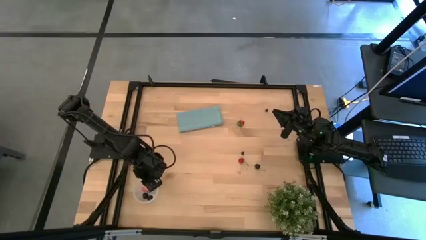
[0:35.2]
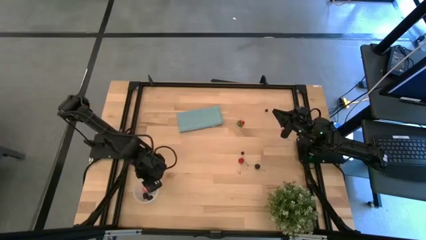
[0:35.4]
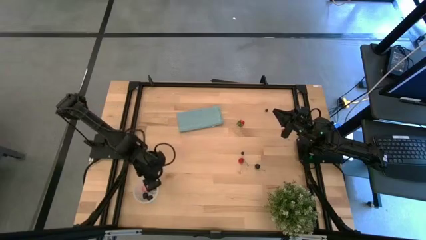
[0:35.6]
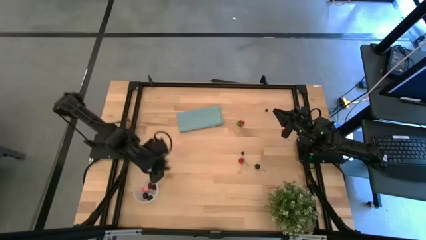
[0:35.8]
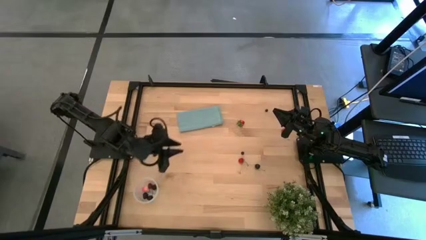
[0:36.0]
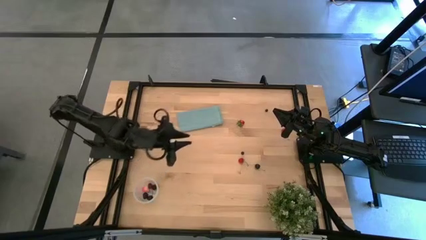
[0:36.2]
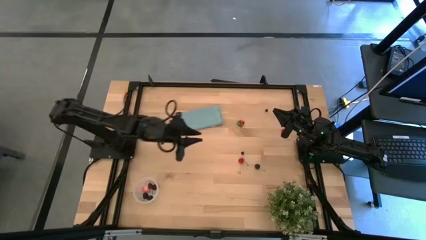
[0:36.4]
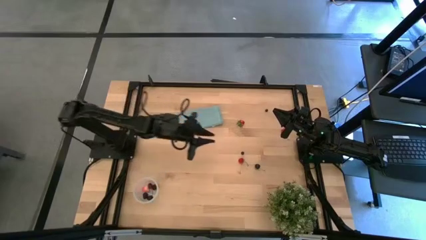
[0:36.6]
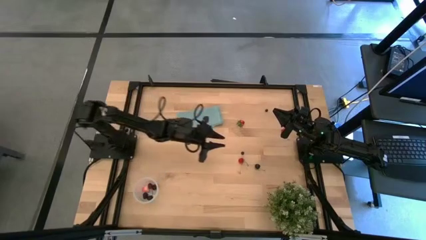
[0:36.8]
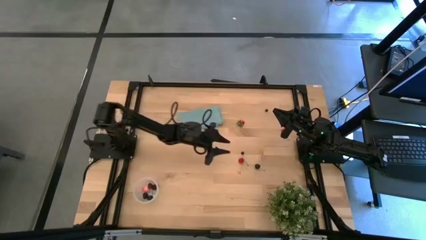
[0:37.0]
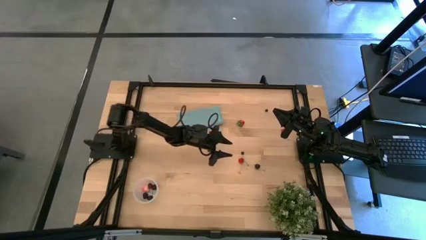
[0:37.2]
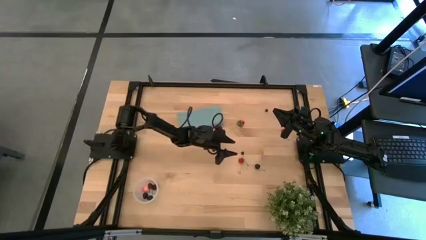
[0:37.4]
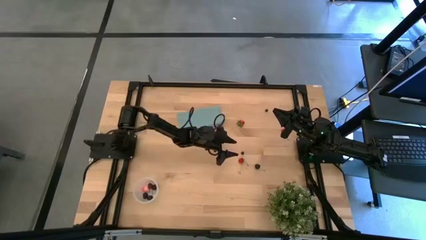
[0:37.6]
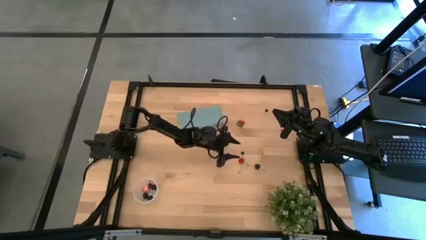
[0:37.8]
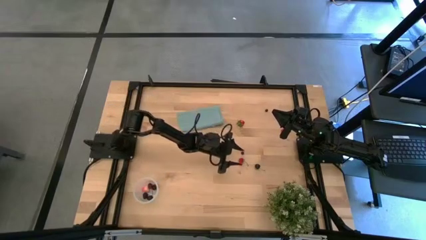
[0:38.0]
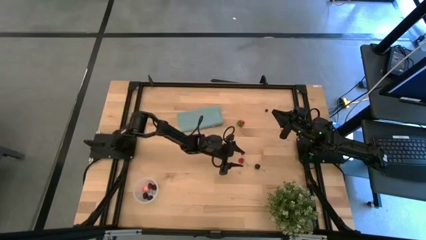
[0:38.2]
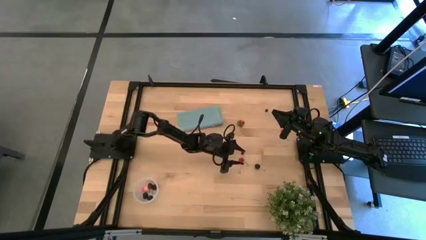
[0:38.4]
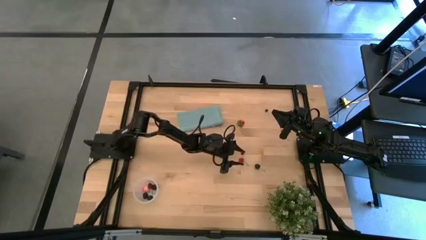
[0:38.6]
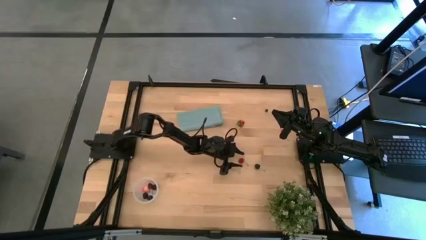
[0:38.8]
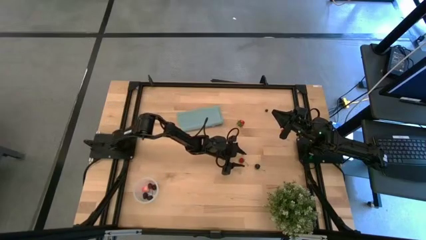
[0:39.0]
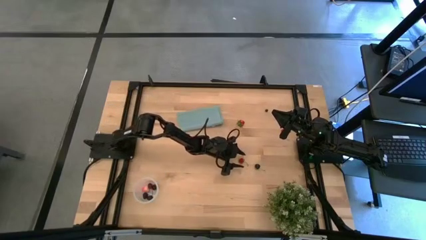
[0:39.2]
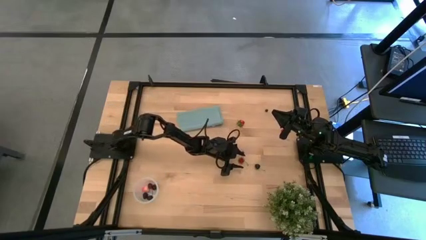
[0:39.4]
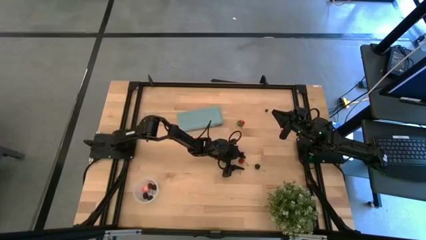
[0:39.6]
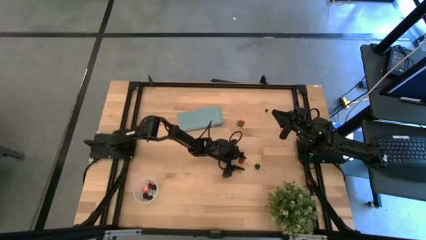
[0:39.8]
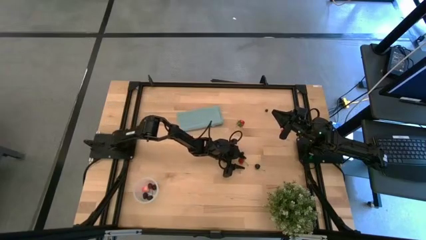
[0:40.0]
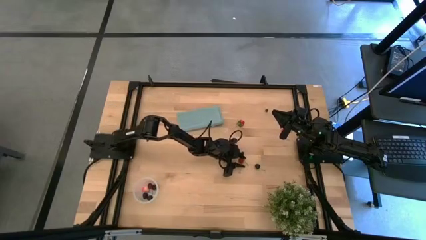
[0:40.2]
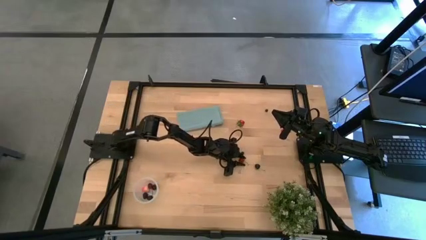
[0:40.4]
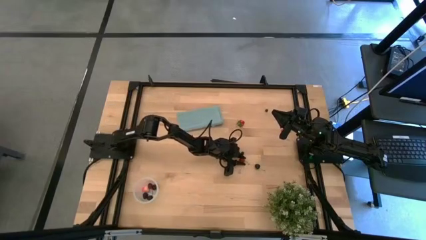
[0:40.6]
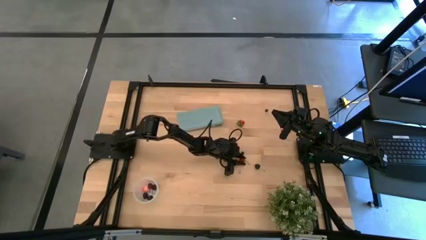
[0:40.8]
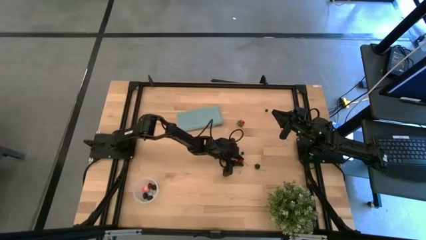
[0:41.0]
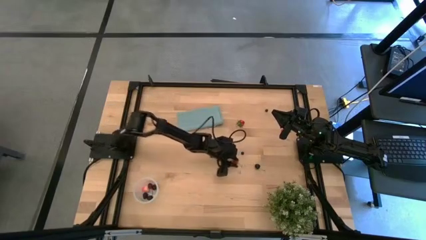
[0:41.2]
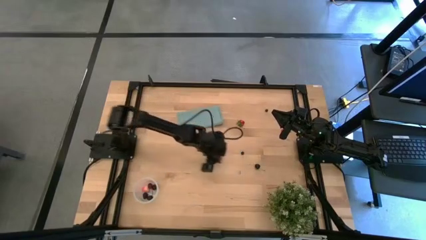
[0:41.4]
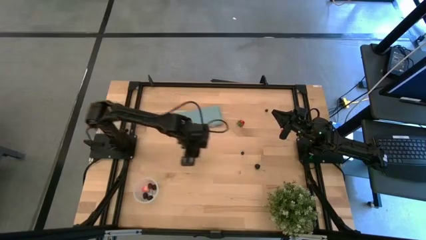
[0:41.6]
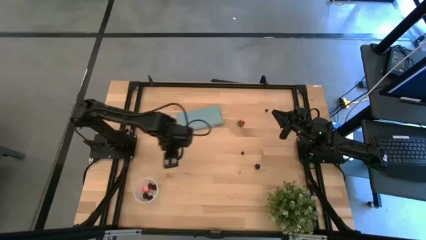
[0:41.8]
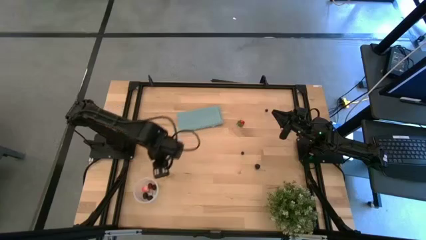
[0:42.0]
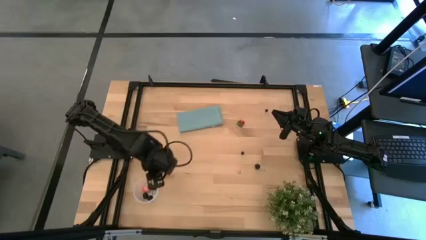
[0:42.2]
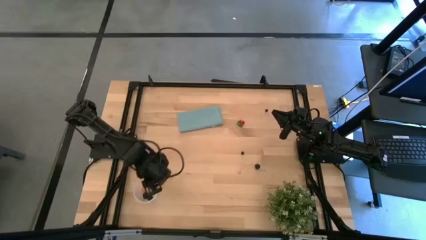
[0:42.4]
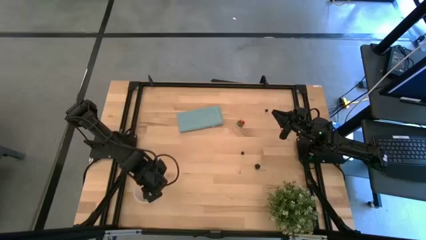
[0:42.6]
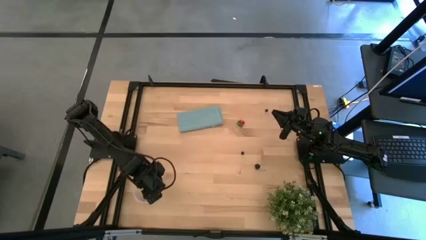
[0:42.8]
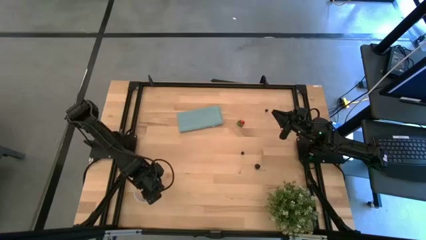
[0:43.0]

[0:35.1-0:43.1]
Task: Pick and placing Produce into tupperware
Put the bottom strawberry into the transparent container

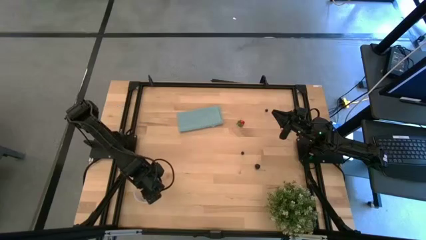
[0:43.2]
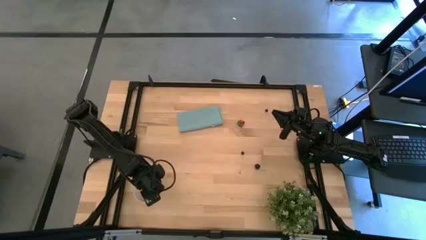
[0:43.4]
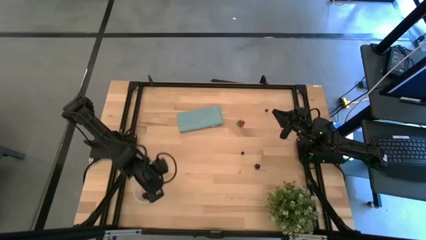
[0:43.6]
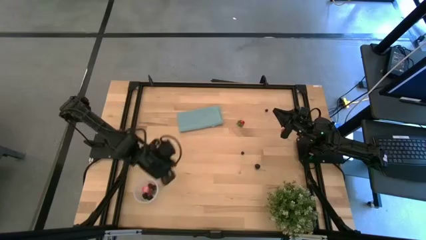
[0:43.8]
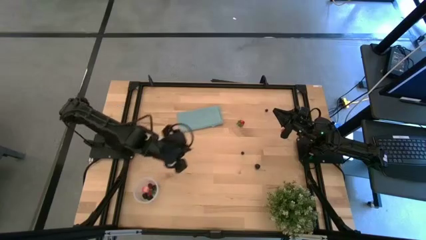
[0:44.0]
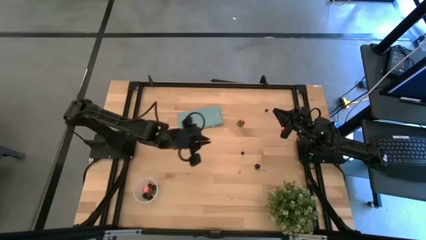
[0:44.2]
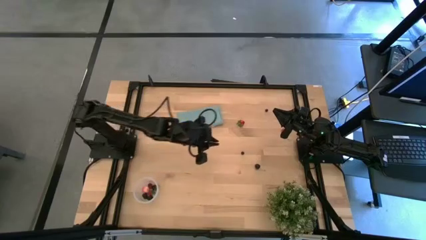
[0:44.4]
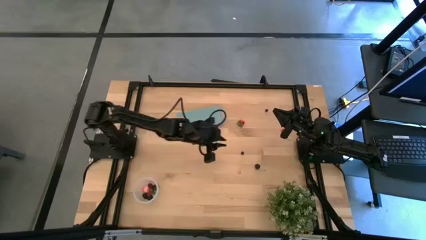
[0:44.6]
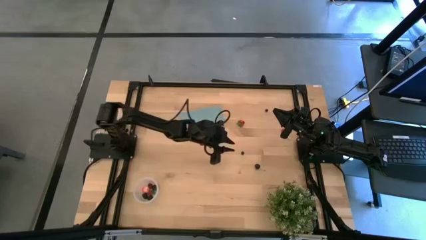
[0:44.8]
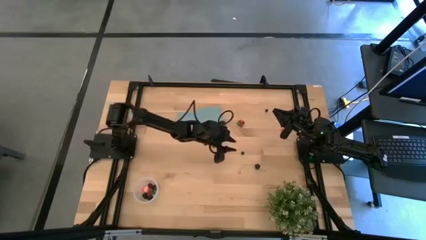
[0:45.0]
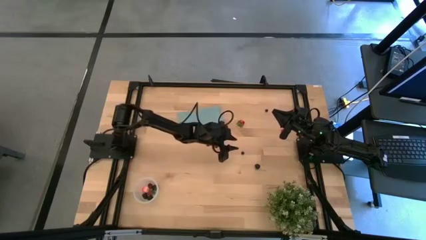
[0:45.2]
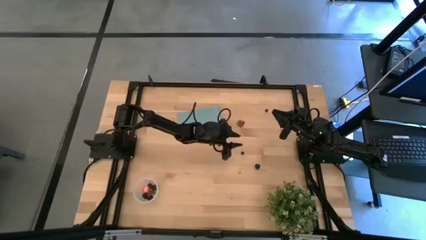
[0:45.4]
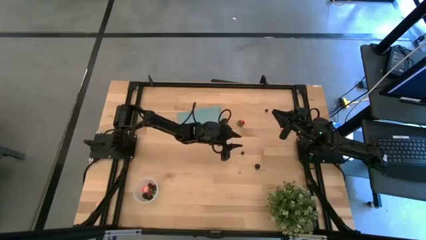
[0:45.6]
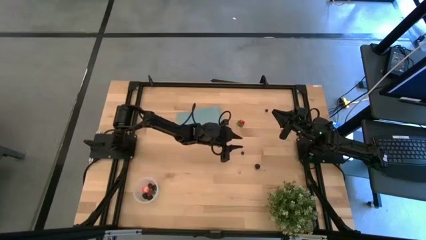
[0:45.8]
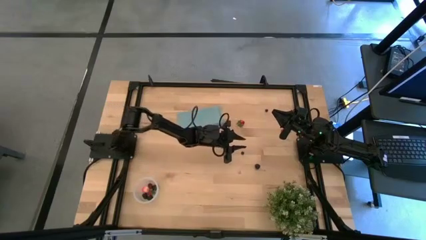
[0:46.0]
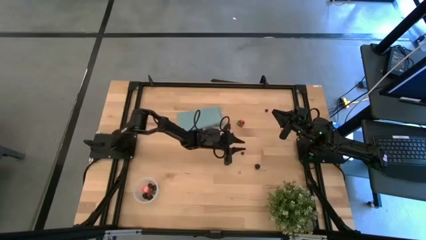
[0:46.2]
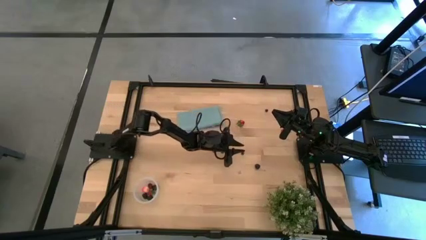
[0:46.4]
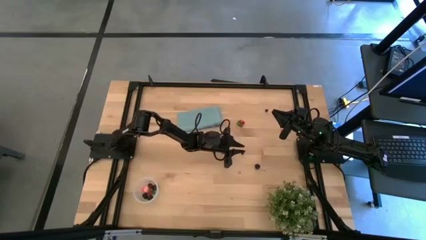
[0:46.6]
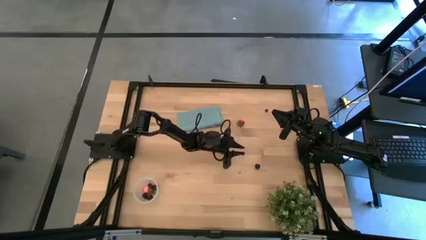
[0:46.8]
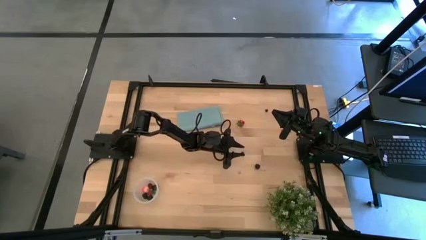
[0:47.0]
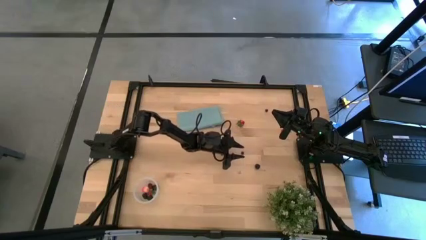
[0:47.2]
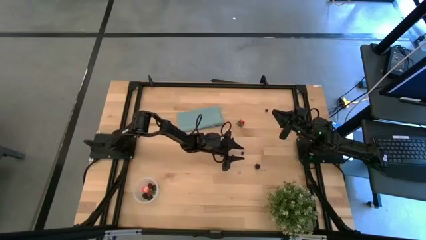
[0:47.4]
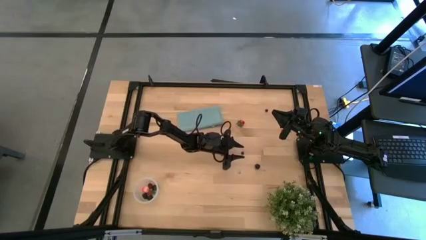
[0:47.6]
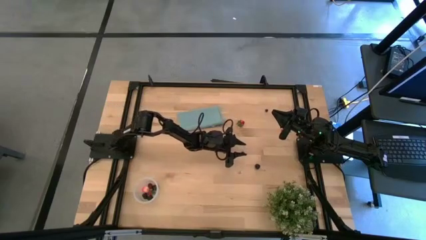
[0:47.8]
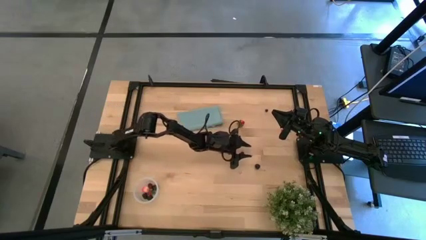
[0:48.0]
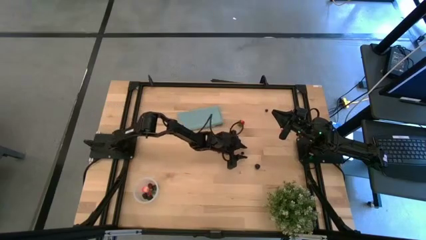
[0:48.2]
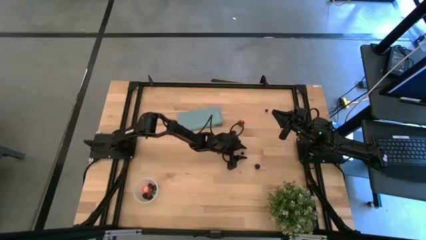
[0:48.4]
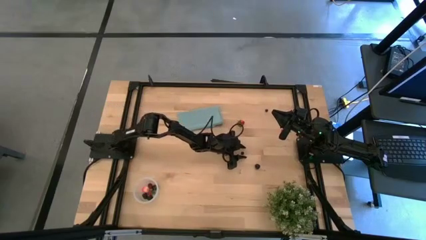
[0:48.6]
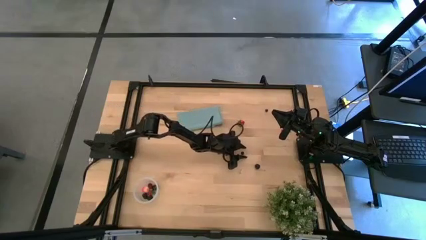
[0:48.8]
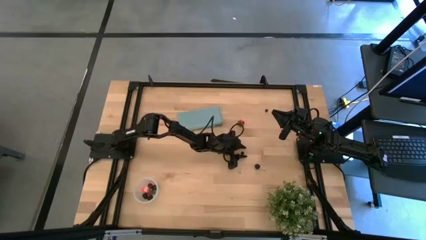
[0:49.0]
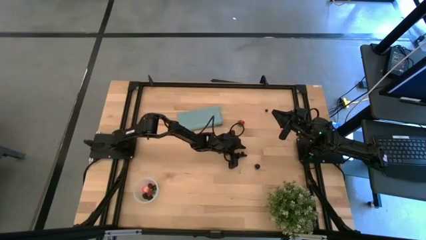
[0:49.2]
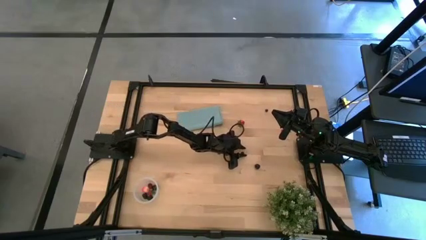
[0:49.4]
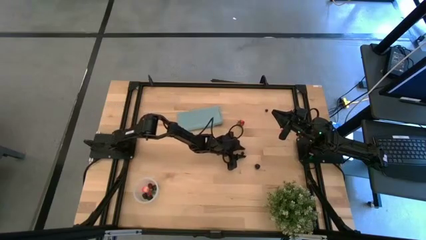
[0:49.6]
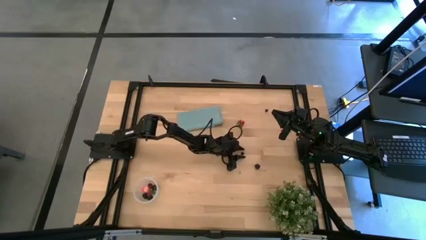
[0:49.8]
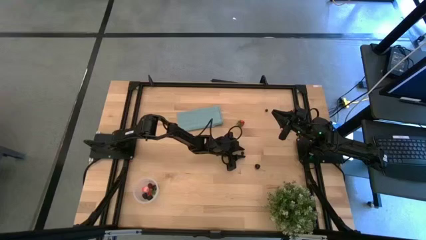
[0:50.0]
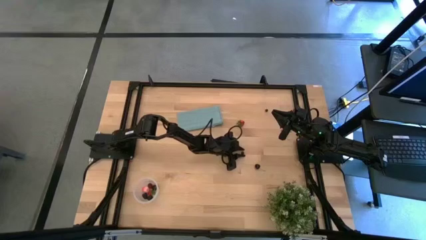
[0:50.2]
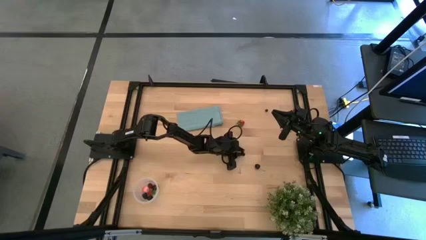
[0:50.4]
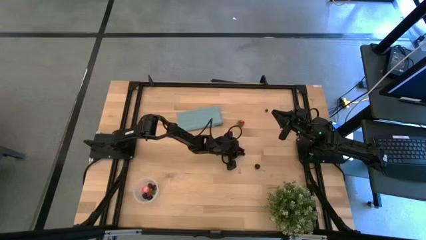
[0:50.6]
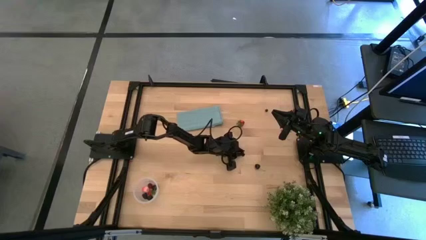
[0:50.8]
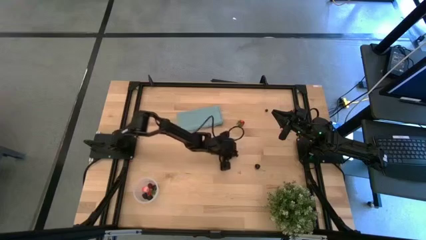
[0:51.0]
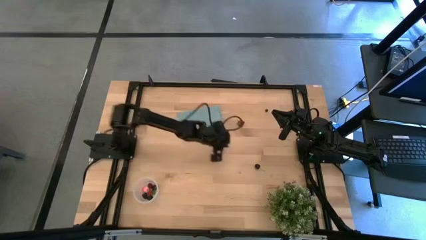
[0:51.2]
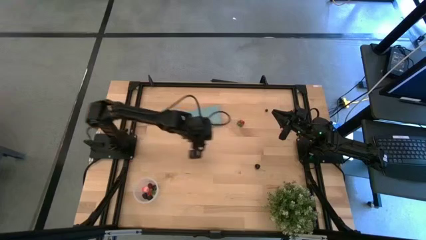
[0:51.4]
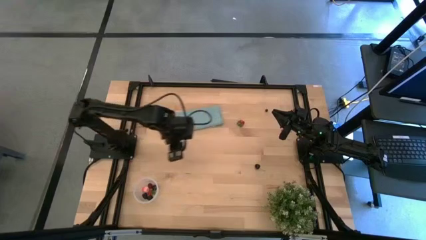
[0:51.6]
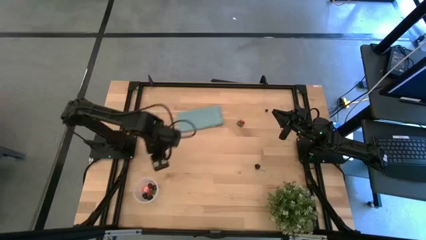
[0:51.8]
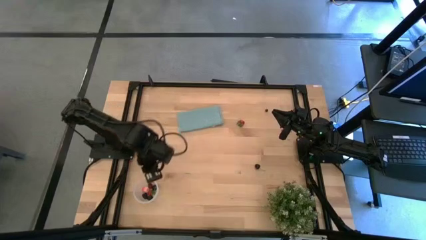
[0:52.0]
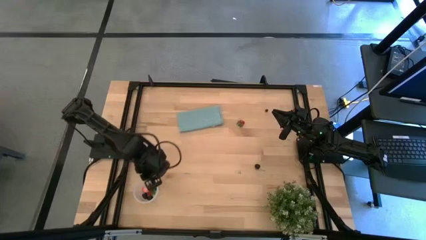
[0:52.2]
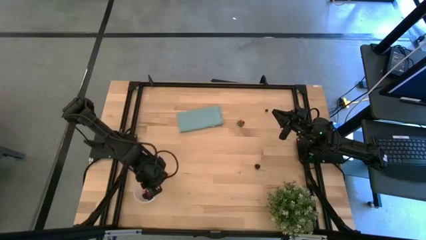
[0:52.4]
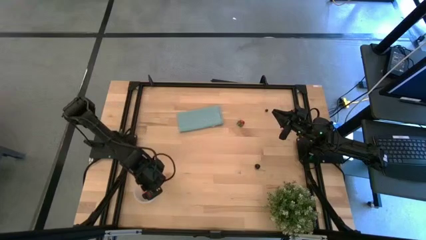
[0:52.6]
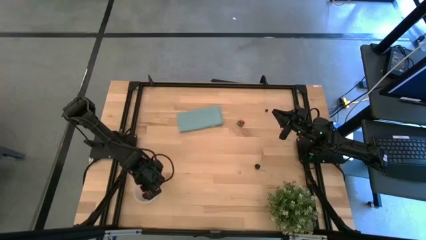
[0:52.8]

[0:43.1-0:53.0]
Put the bottom blueberry into the transparent container
